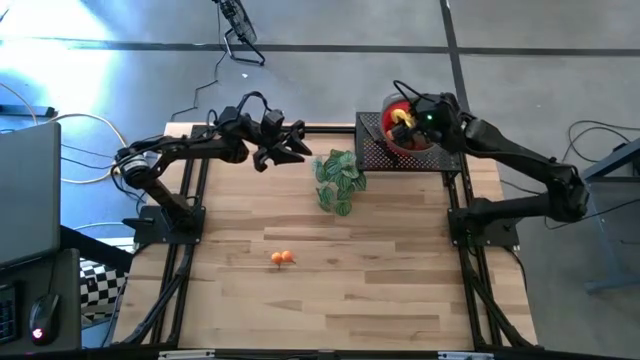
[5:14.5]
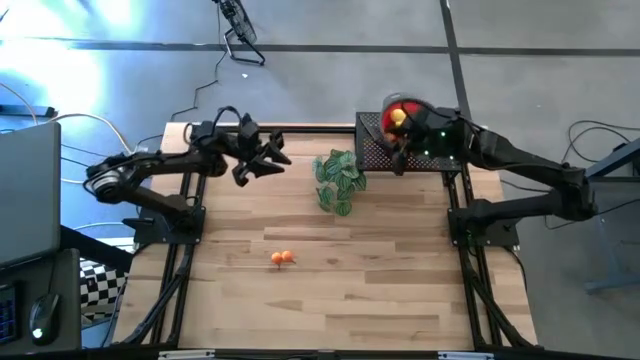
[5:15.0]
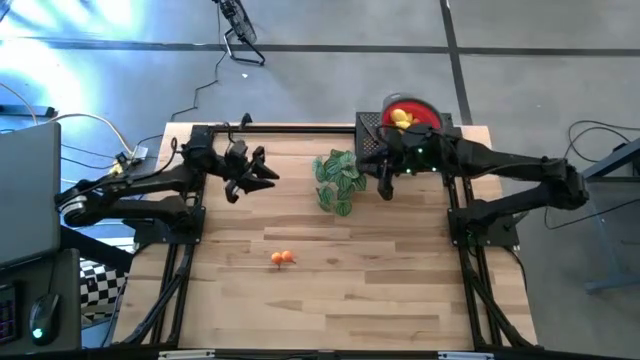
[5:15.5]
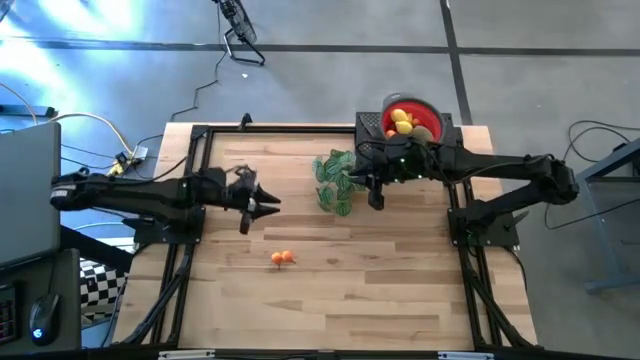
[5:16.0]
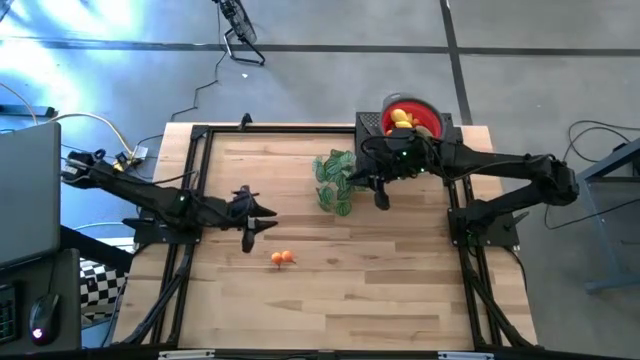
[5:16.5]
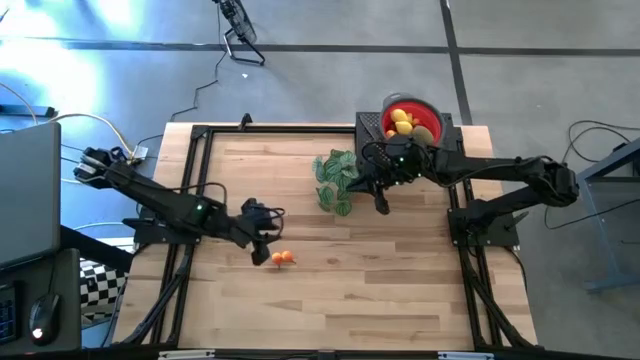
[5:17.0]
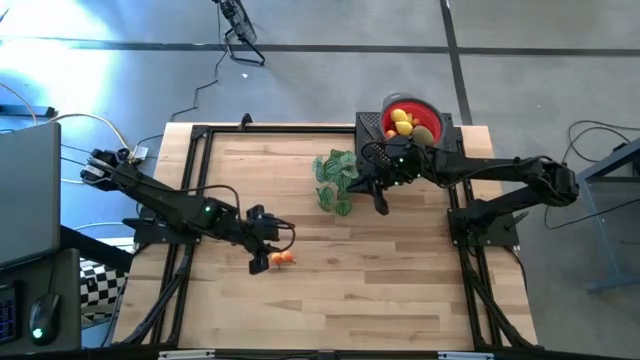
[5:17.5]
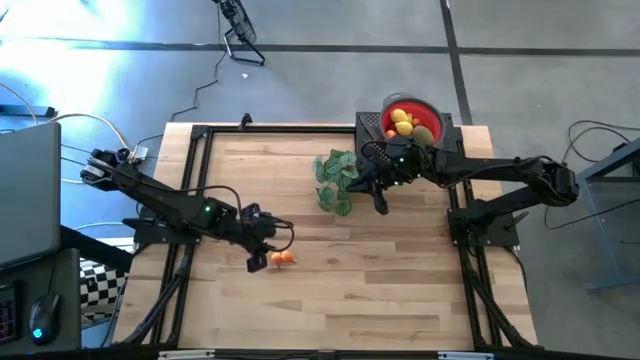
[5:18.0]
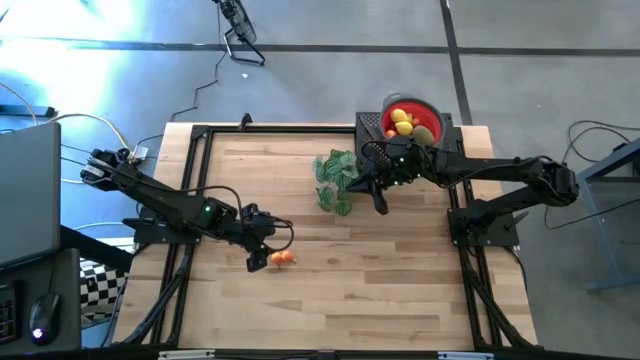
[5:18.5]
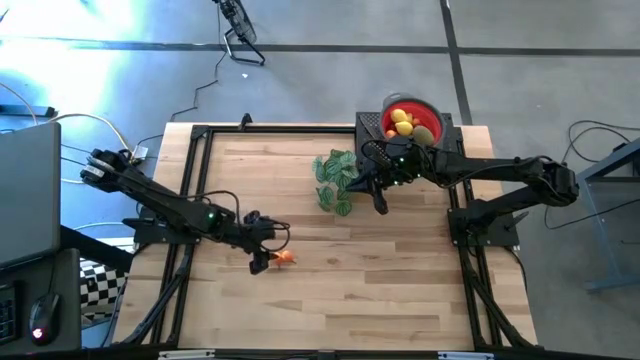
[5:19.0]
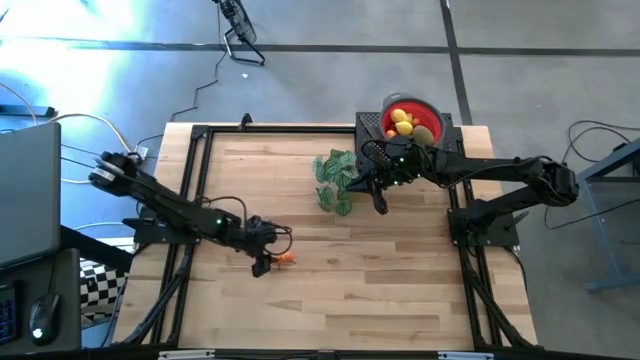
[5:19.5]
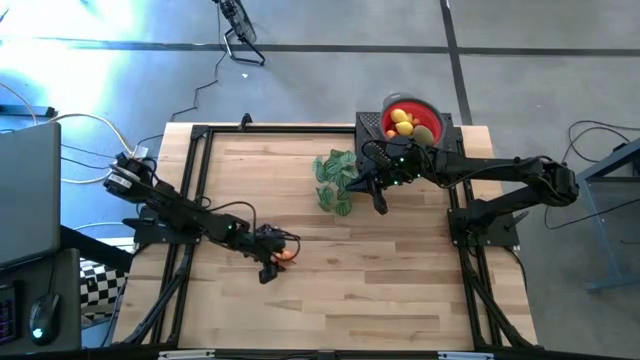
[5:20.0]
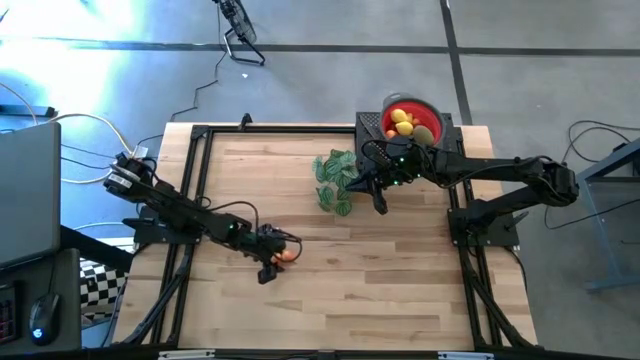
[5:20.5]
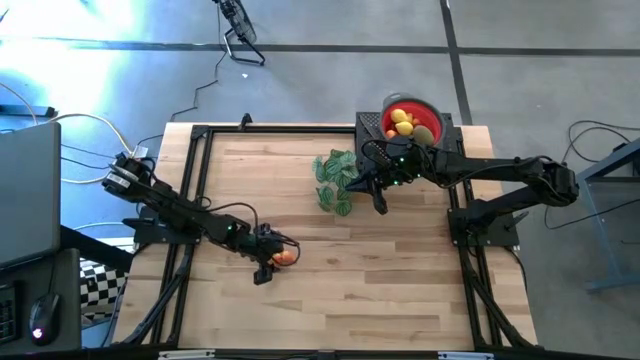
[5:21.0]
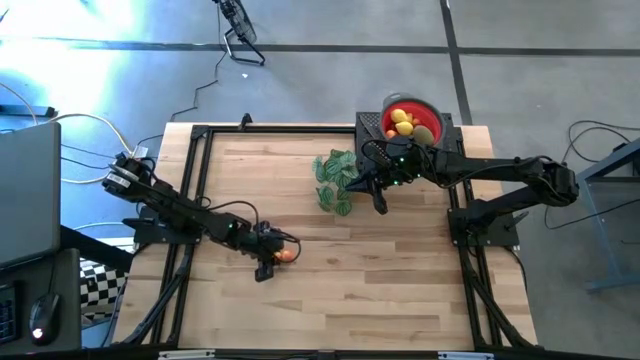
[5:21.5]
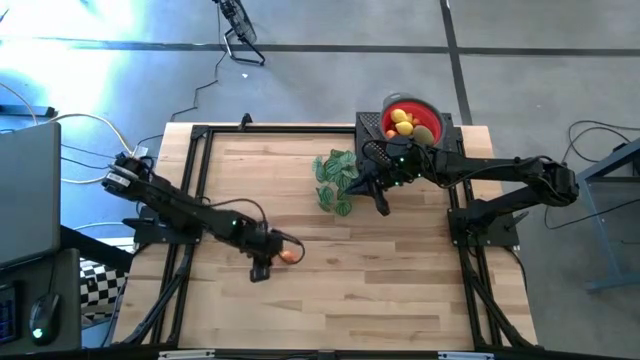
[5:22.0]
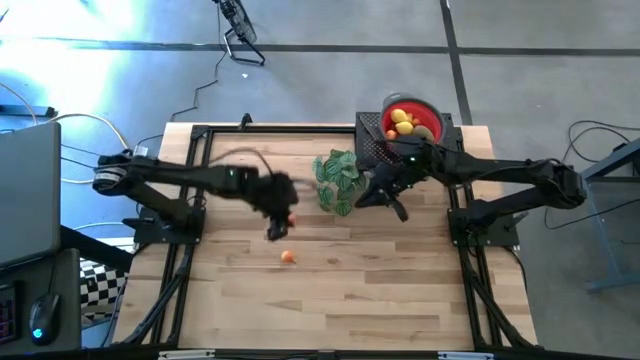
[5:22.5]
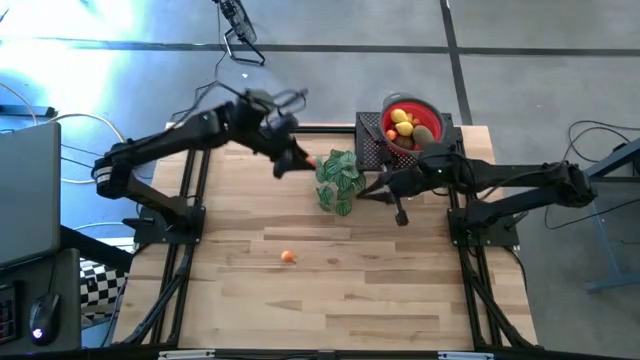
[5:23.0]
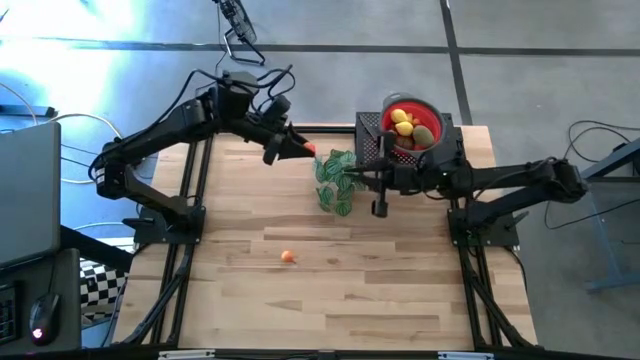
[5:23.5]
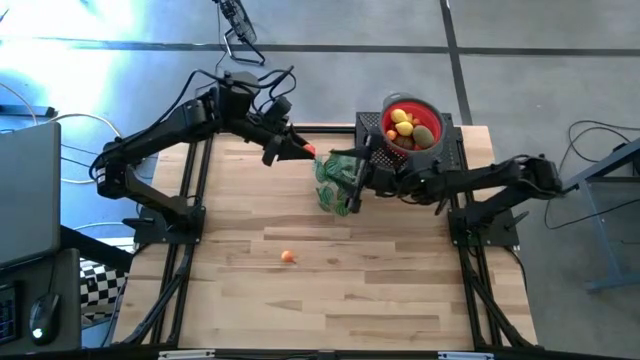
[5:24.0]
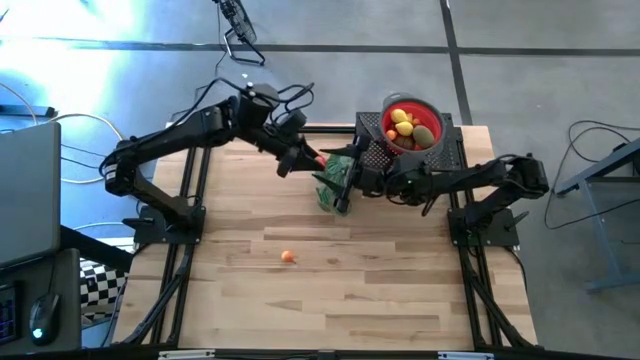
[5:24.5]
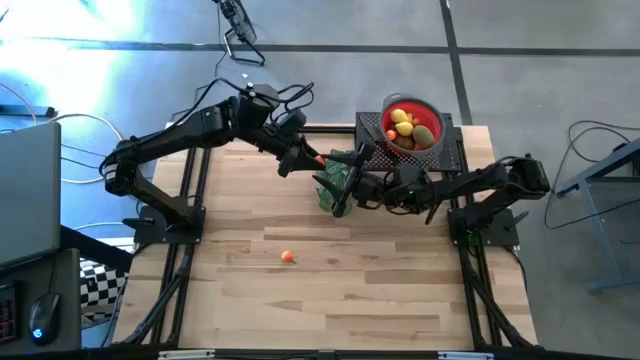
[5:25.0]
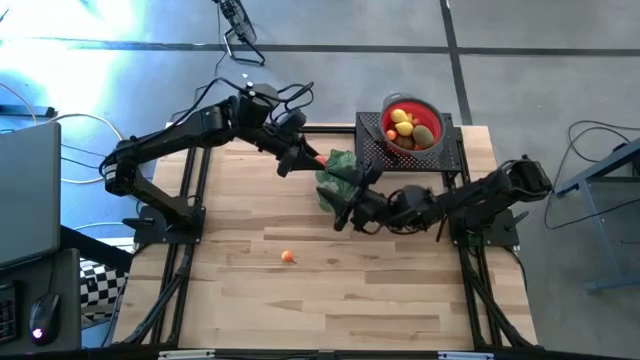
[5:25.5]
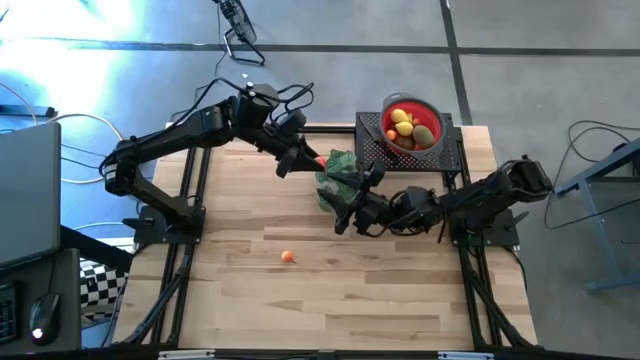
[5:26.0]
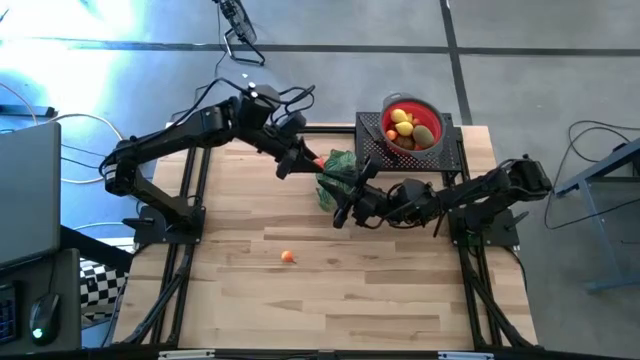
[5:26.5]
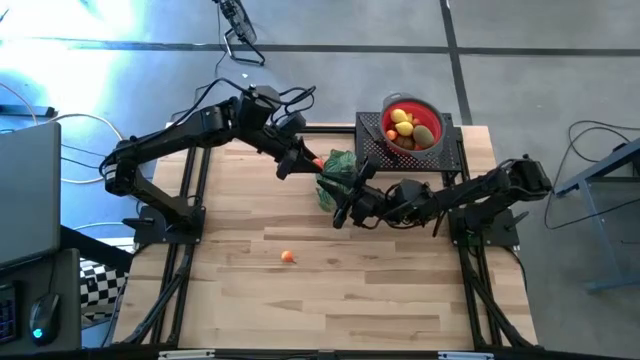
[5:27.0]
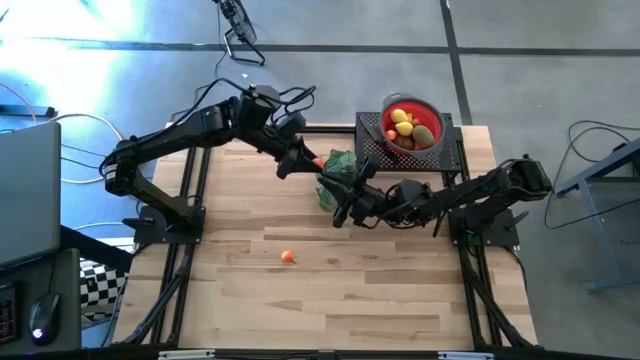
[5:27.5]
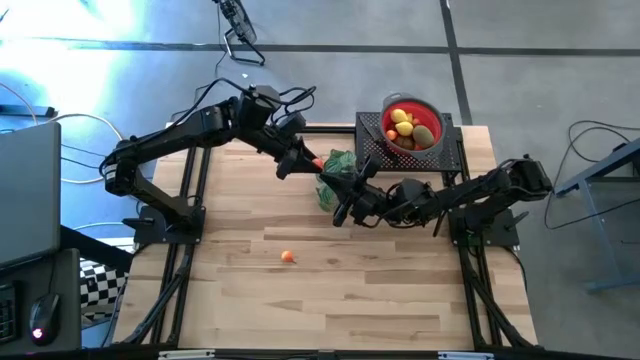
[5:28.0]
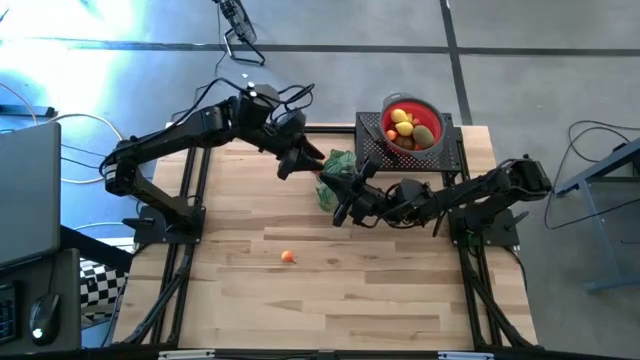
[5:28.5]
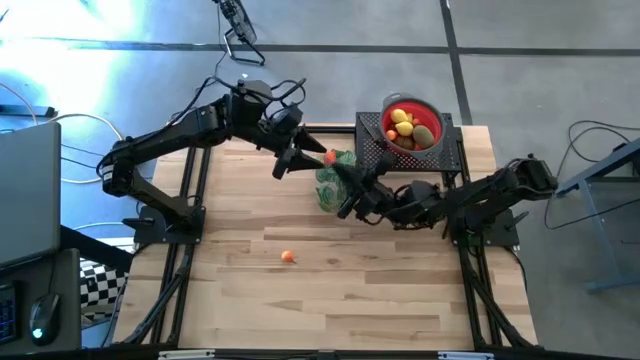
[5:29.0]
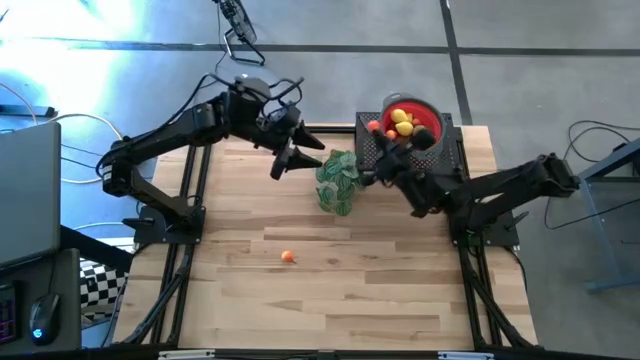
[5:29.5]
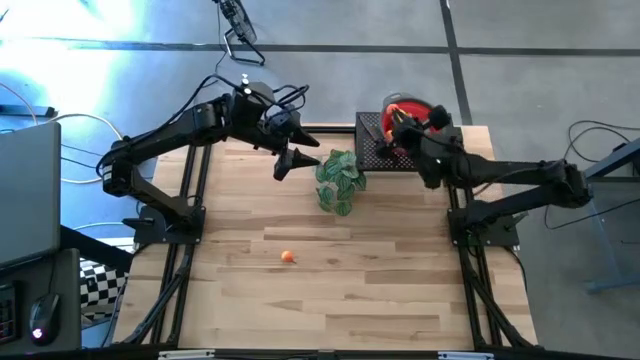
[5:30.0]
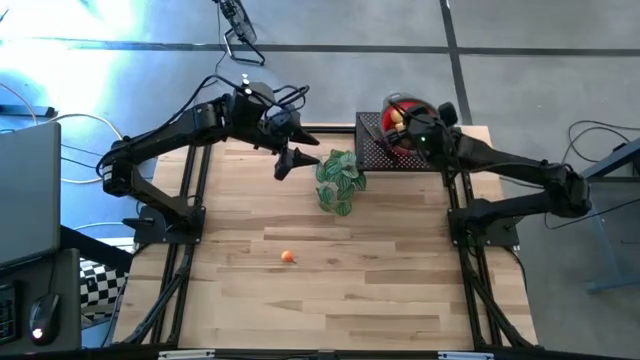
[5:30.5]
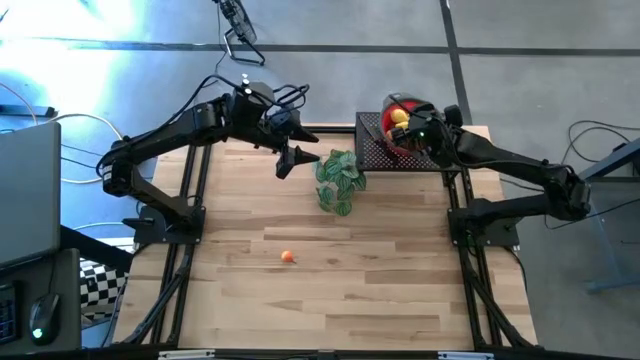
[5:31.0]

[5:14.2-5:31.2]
Task: Pick & Place Fruit
Put the orange pear into the red colander

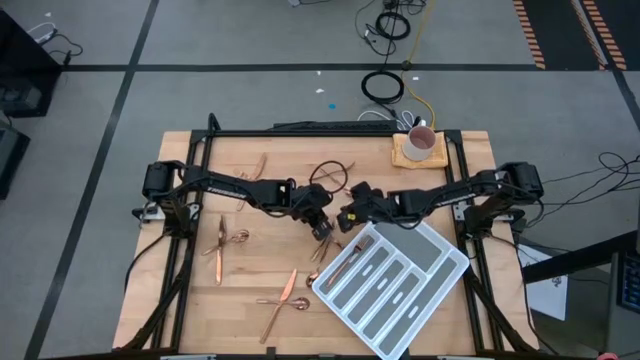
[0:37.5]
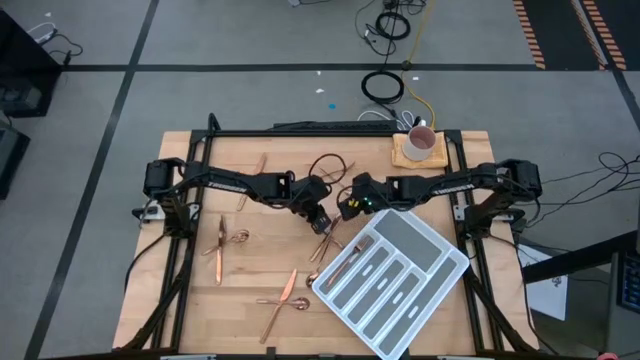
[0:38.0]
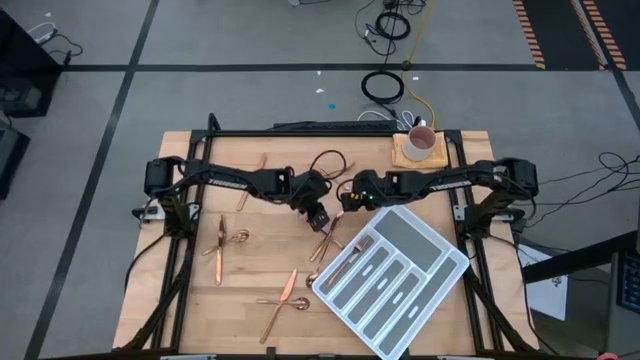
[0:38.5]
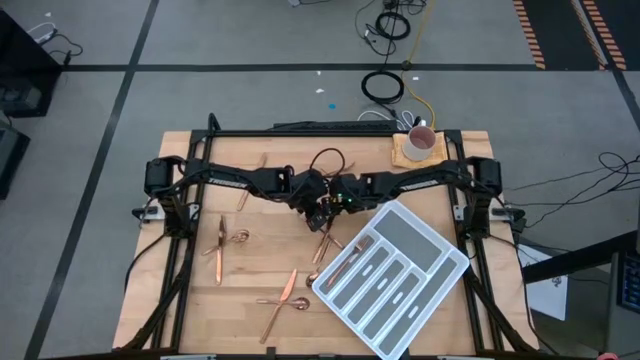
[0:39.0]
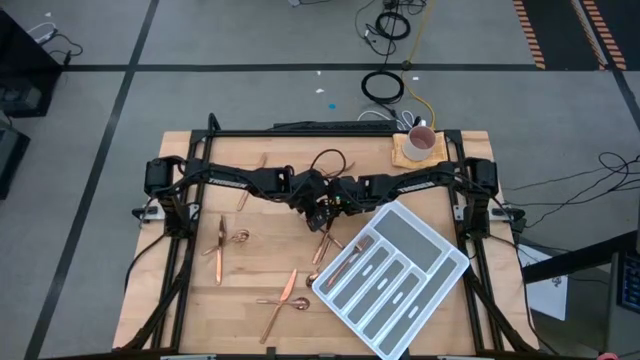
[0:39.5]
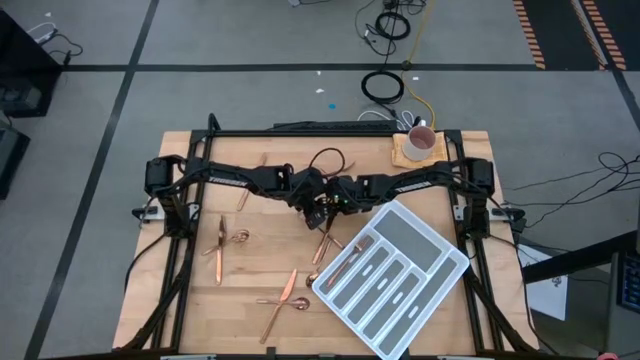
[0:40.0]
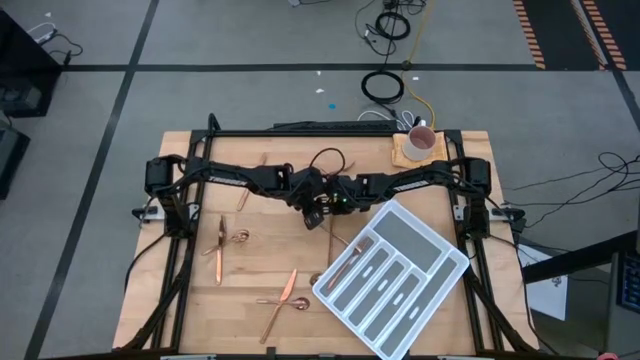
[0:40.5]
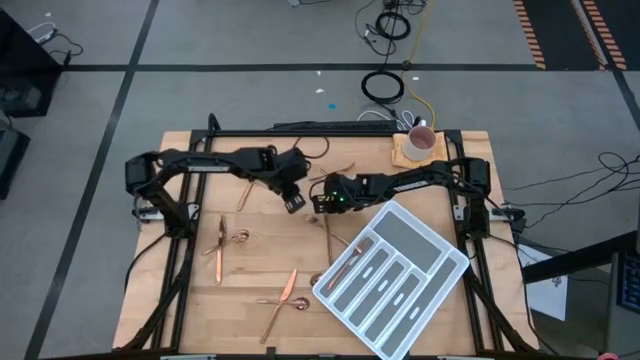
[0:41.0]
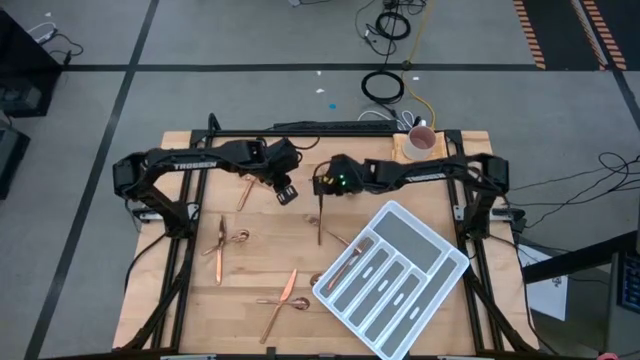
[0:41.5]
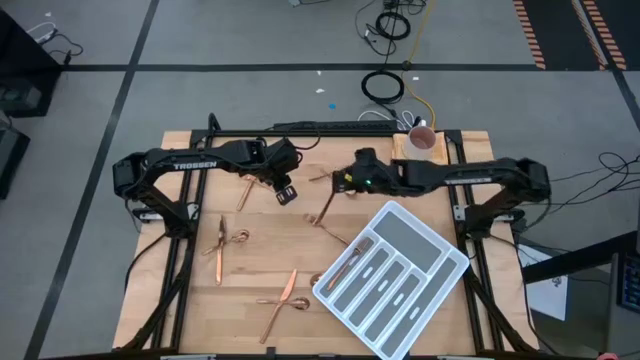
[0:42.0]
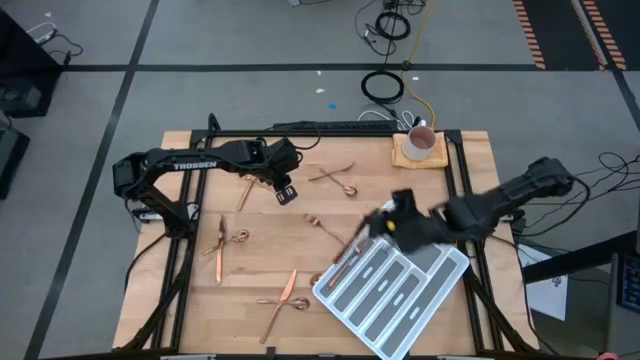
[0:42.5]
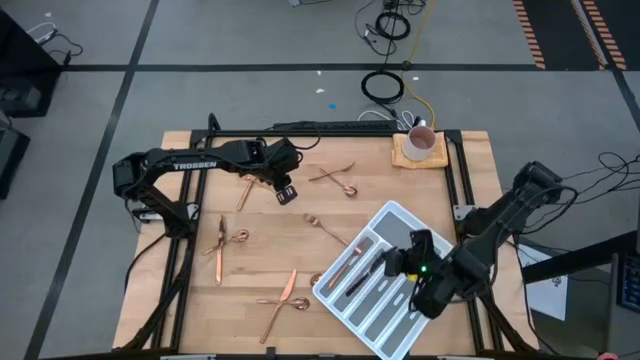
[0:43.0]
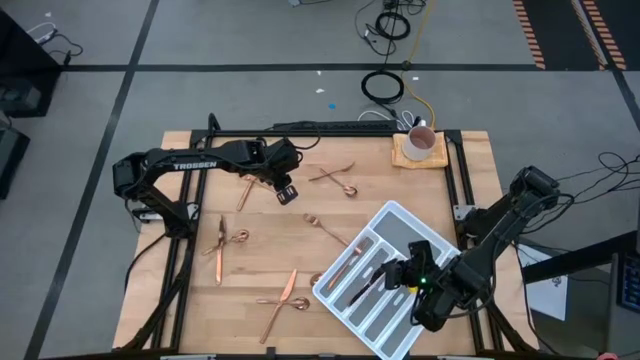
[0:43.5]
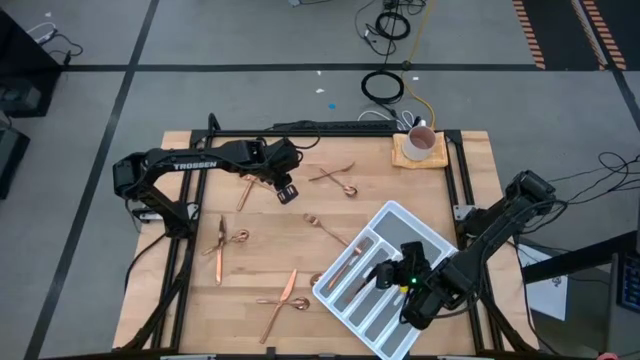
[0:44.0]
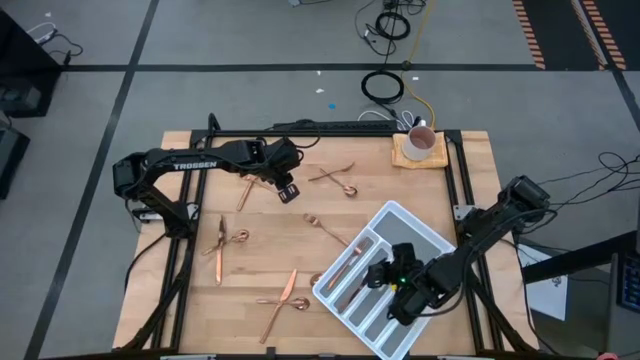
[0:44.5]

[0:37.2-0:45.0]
Task: Sort silverware
Put the gold knife into the silverware tray
